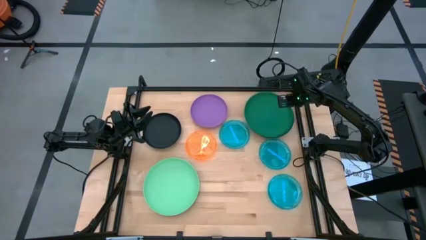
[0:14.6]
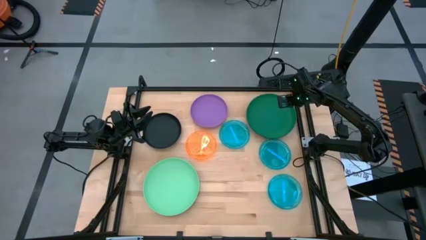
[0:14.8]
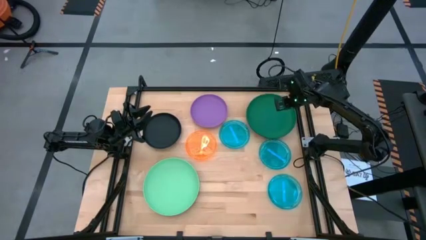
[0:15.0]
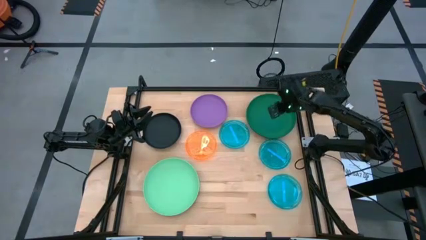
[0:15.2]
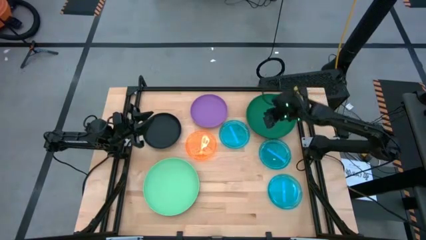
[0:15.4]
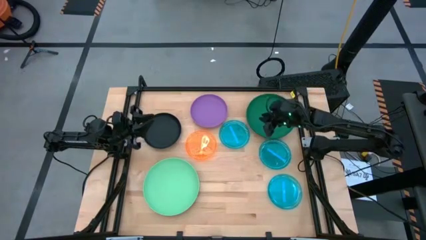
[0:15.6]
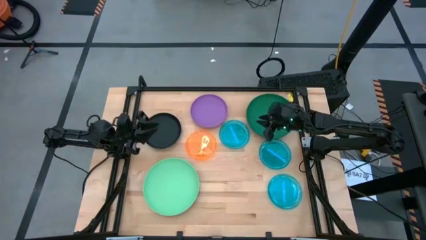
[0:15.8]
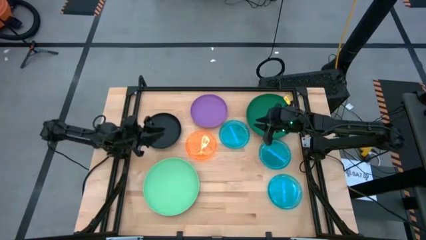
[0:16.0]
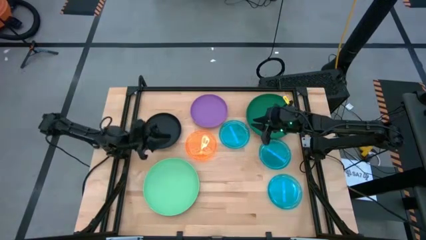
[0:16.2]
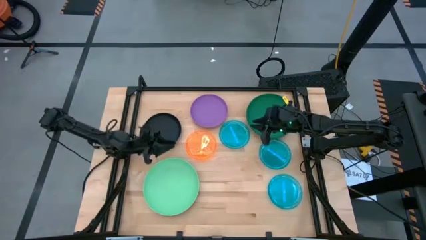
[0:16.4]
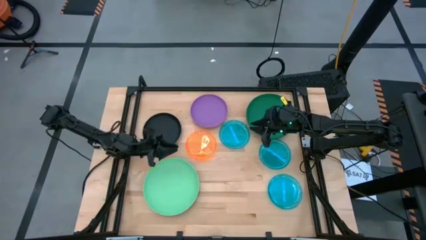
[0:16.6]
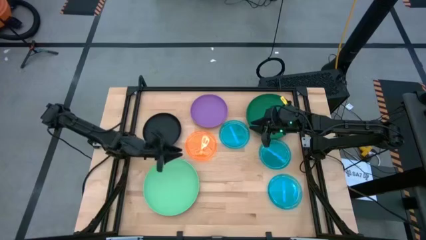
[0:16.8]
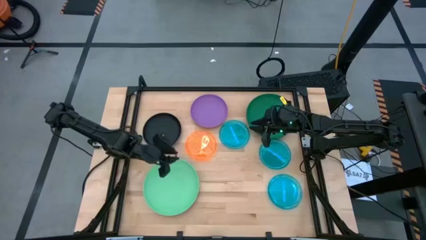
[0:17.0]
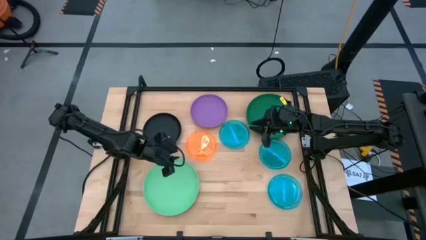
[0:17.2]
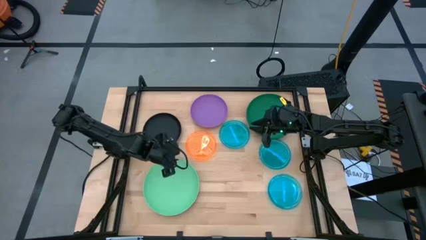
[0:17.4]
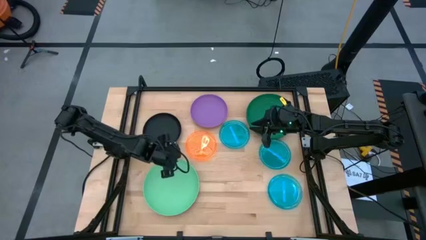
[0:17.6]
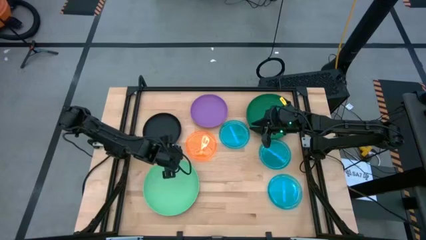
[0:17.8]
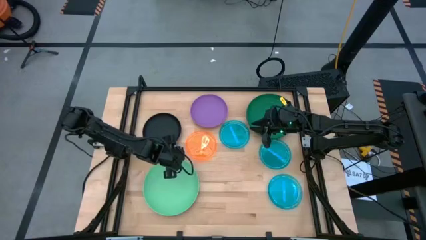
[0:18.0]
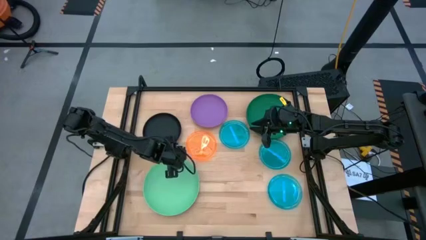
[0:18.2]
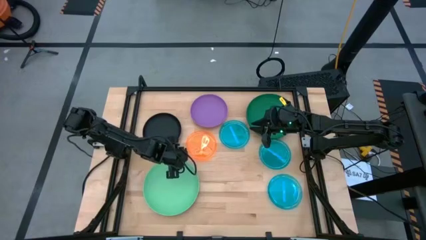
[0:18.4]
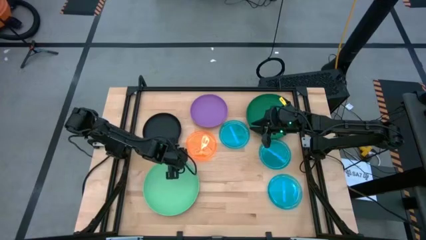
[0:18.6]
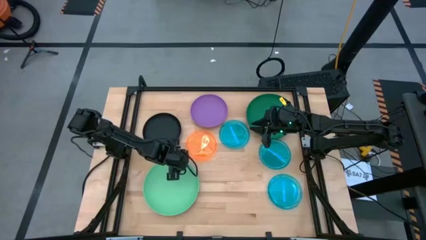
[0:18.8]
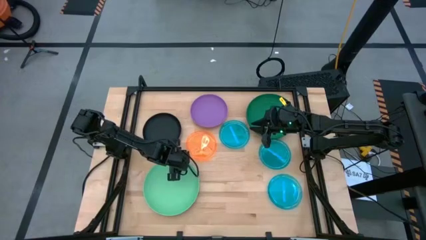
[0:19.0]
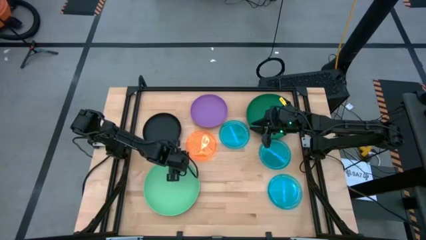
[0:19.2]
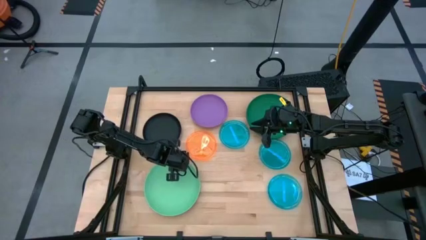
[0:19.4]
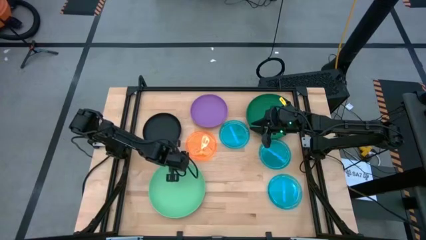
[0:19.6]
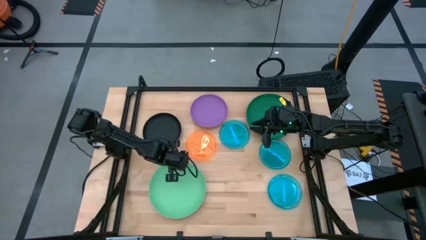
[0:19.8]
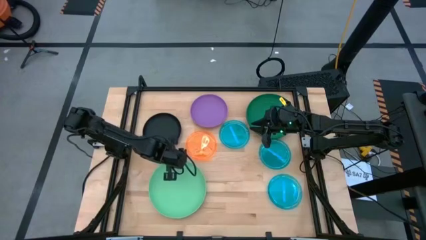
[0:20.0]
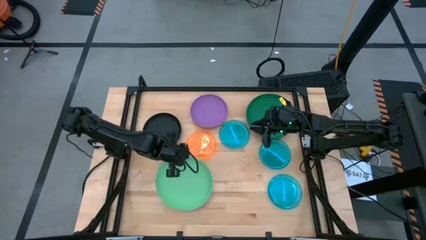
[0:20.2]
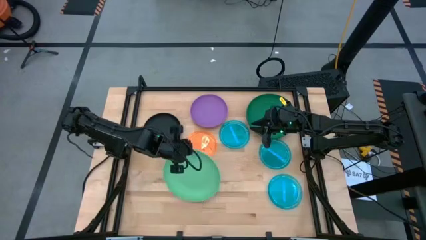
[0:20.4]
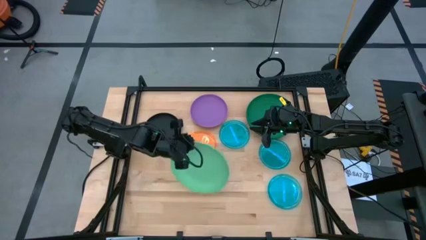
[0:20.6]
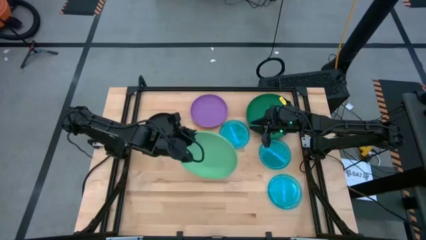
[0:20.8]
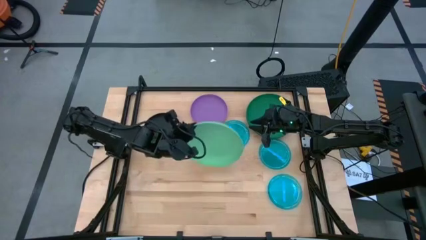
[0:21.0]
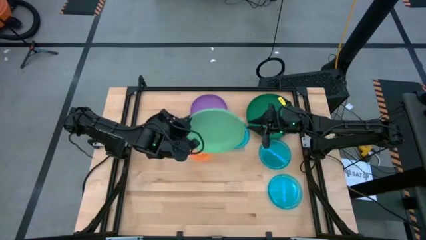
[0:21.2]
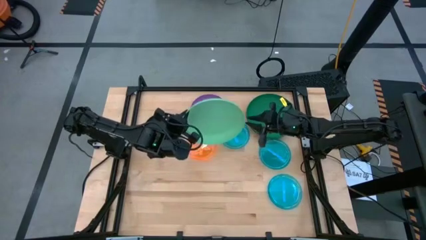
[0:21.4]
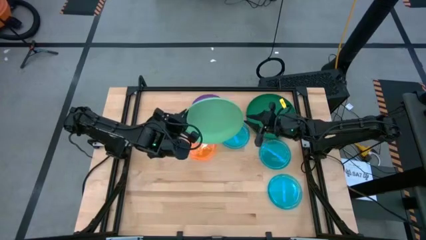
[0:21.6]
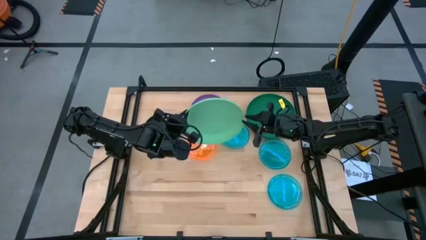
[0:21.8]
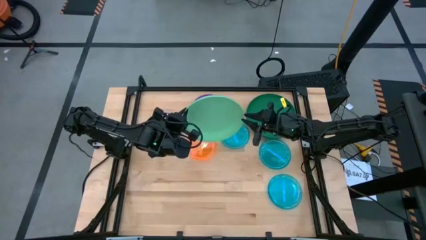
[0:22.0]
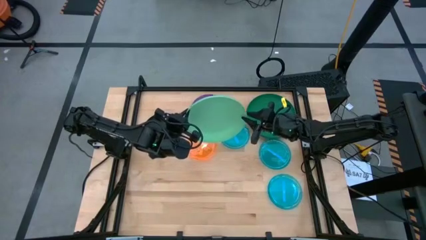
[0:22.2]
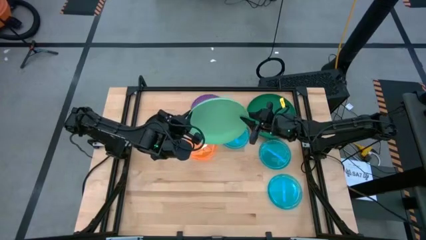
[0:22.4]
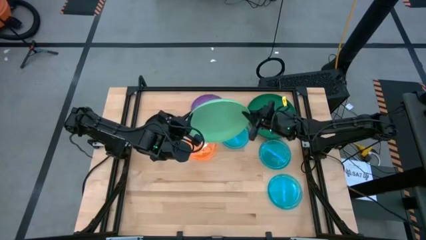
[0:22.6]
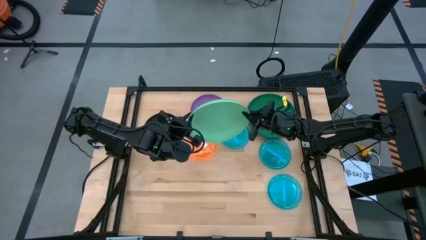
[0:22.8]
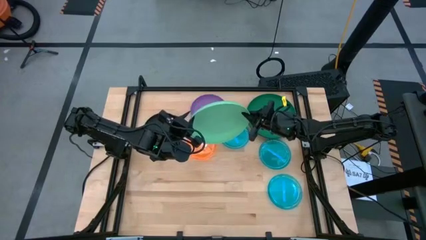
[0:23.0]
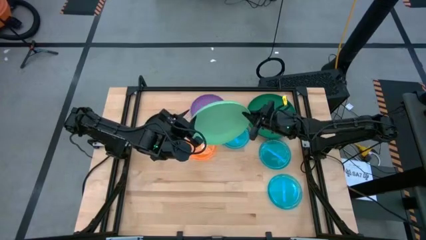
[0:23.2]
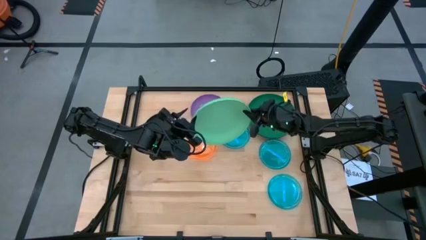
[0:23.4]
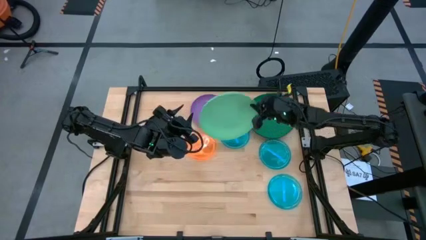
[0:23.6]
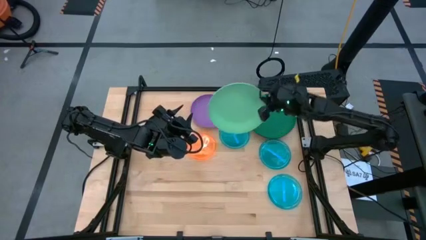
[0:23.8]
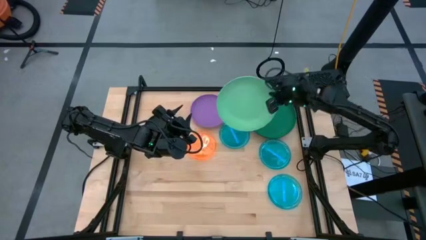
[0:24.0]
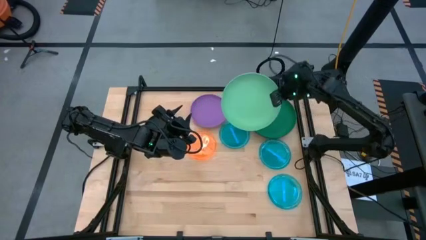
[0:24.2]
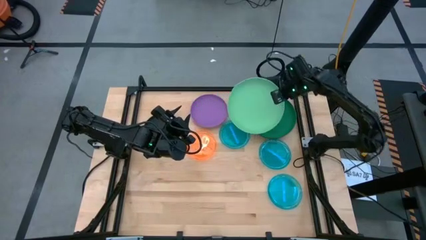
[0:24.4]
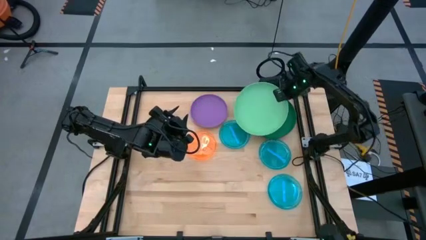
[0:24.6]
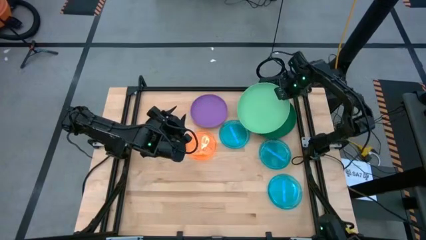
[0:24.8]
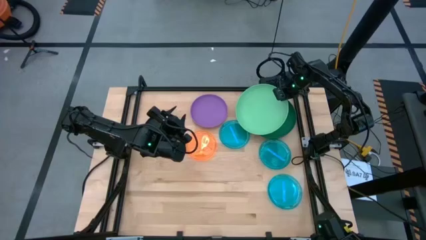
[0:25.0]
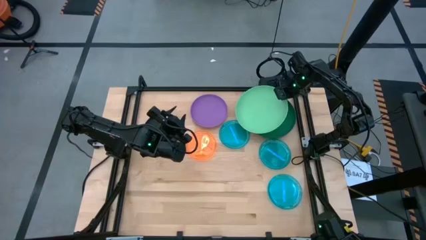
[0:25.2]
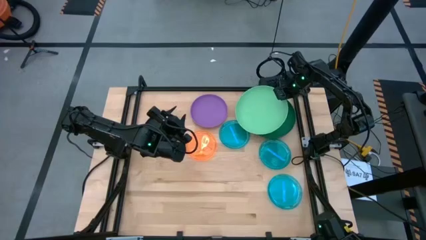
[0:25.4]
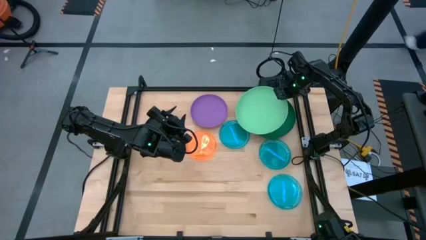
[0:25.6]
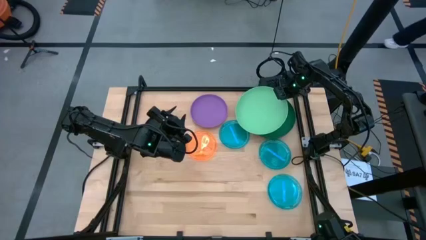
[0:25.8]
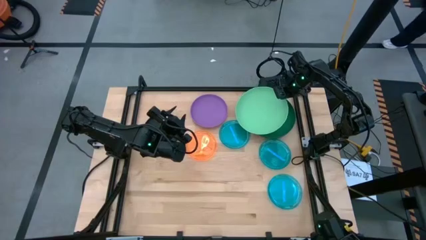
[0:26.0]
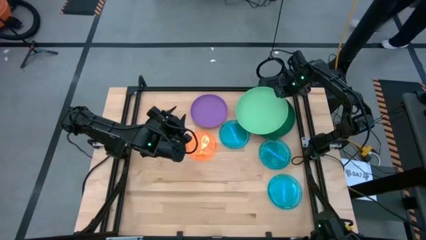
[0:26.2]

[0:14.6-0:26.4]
Task: Stack plastic plates
Stack the light green plate on the dark green plate
